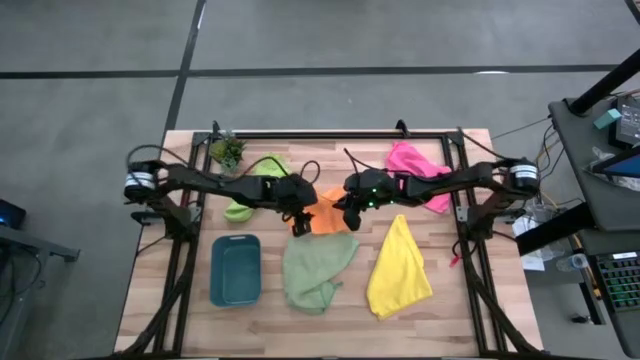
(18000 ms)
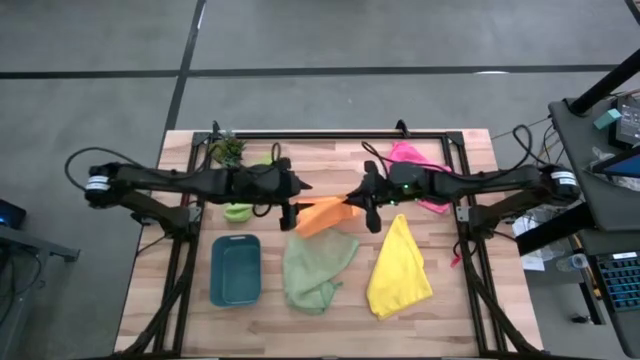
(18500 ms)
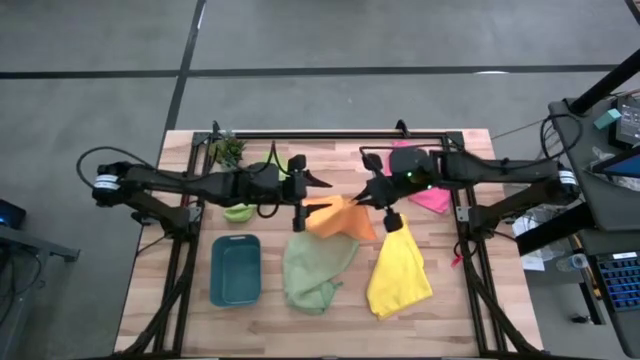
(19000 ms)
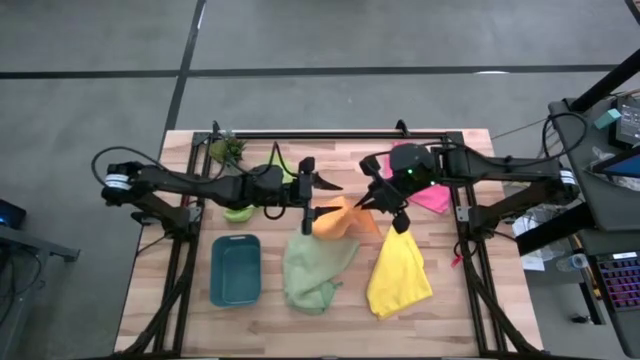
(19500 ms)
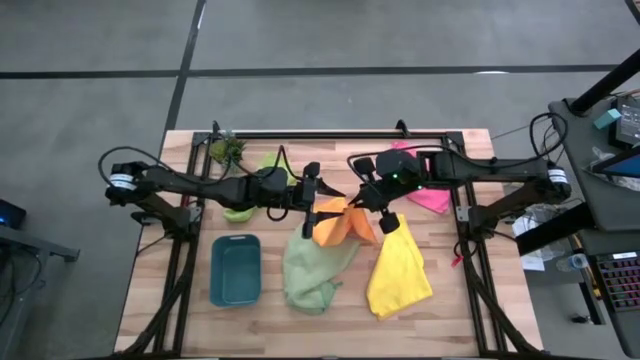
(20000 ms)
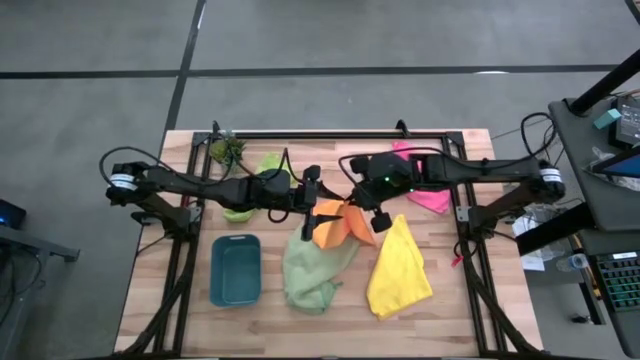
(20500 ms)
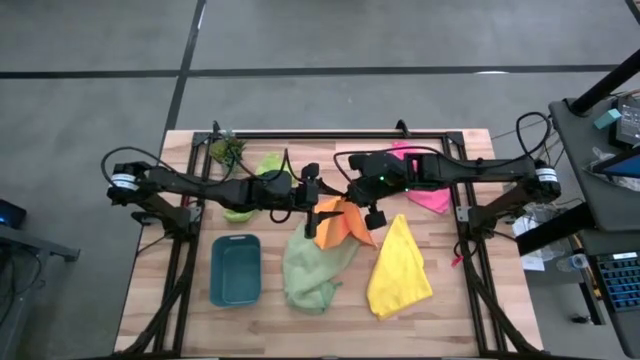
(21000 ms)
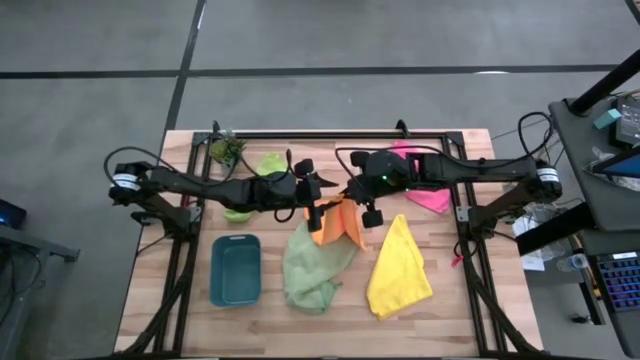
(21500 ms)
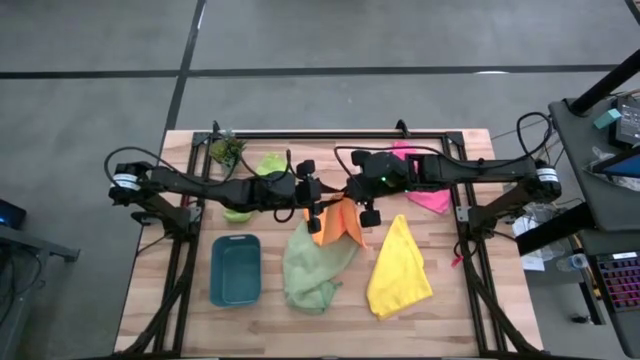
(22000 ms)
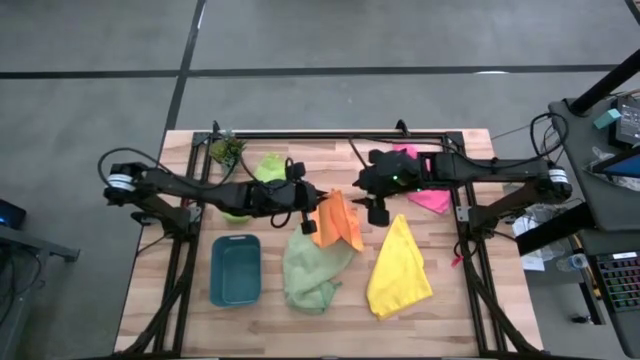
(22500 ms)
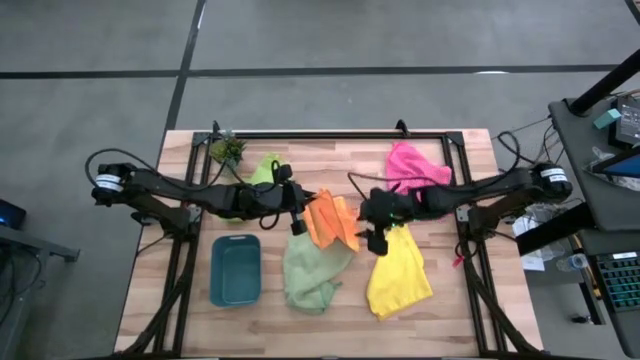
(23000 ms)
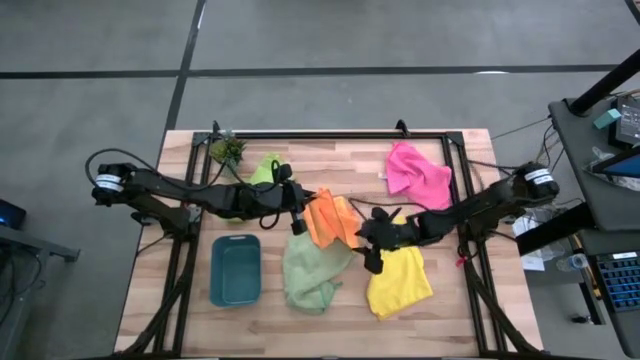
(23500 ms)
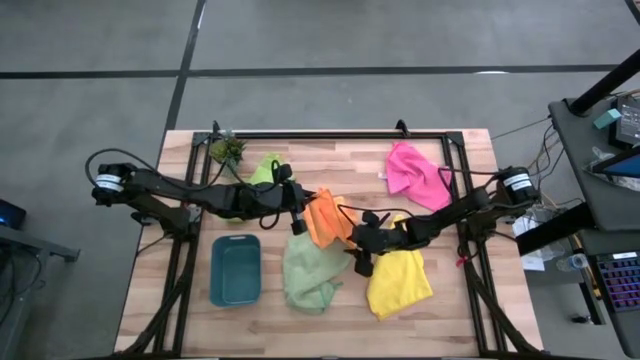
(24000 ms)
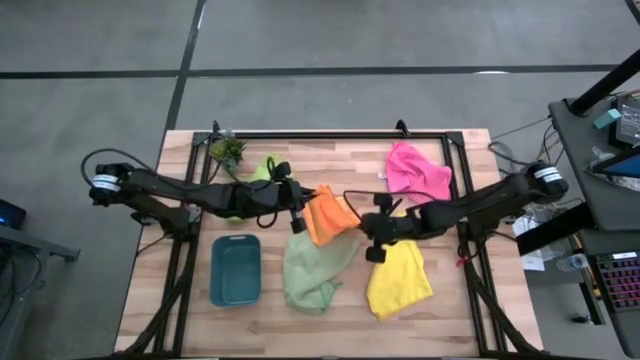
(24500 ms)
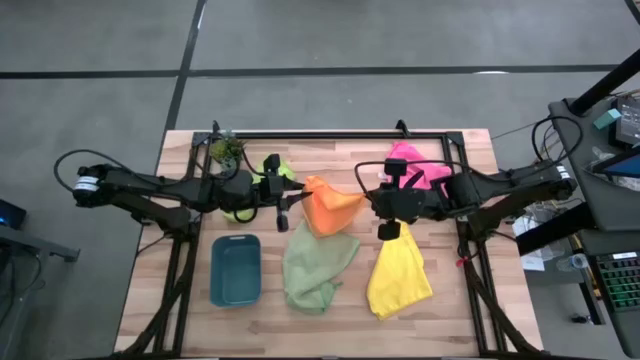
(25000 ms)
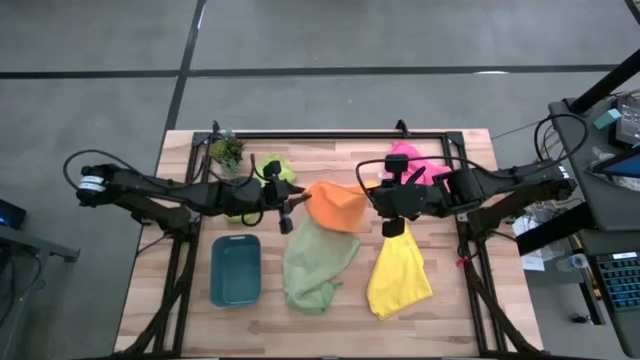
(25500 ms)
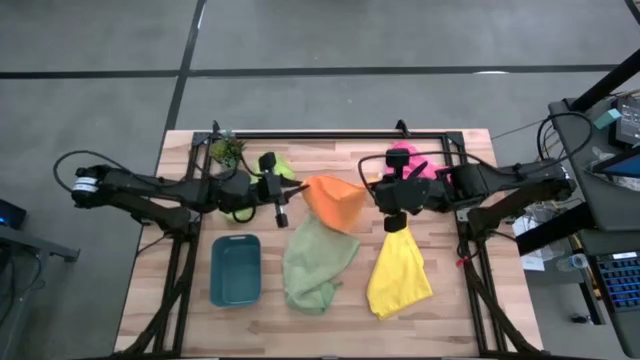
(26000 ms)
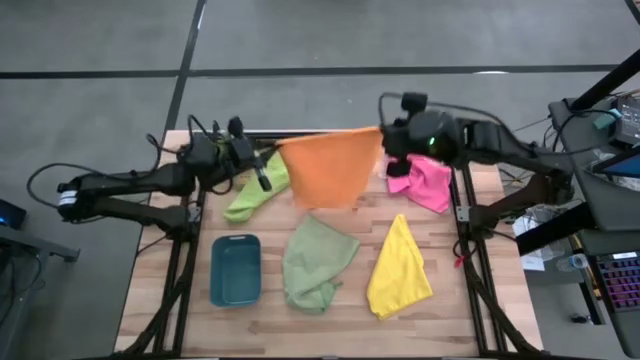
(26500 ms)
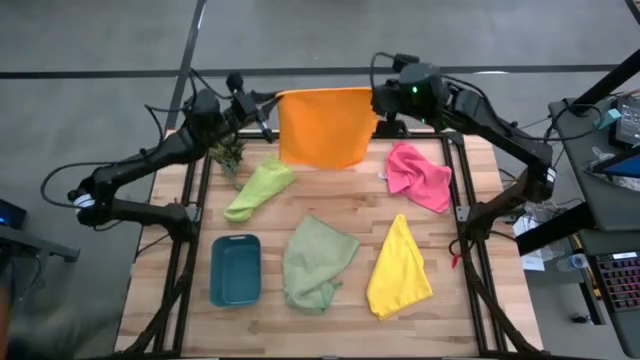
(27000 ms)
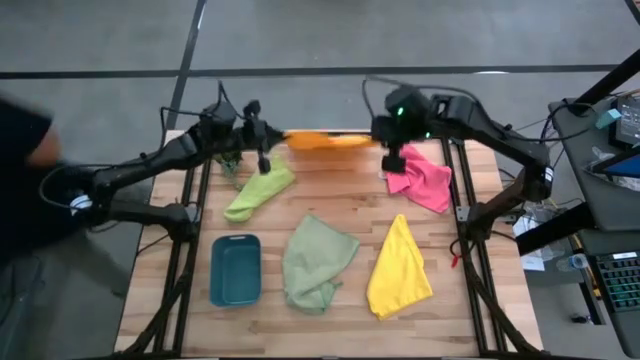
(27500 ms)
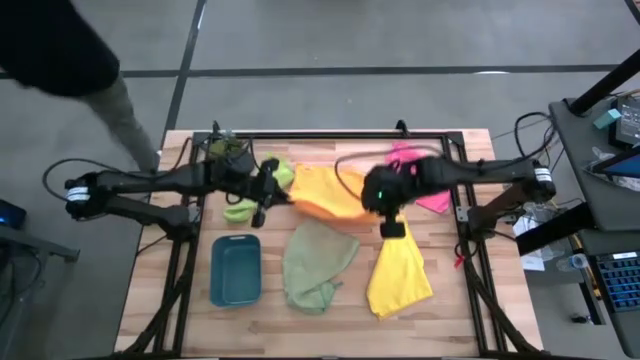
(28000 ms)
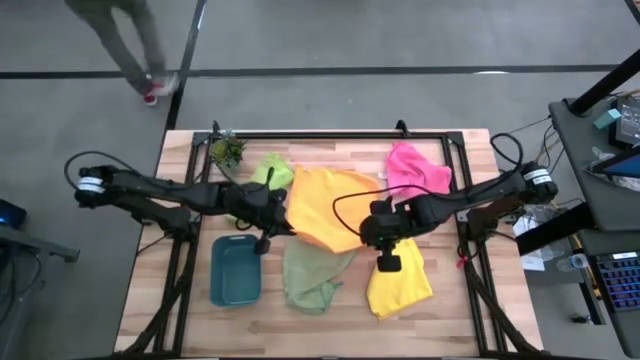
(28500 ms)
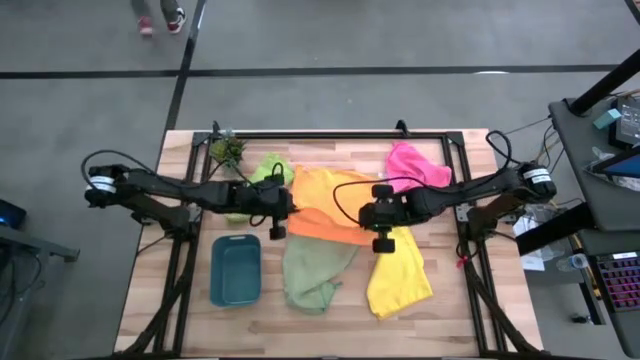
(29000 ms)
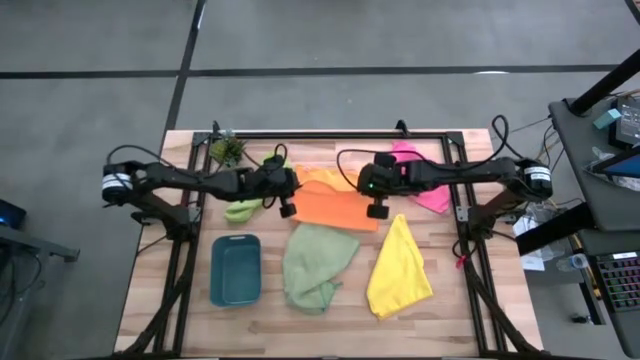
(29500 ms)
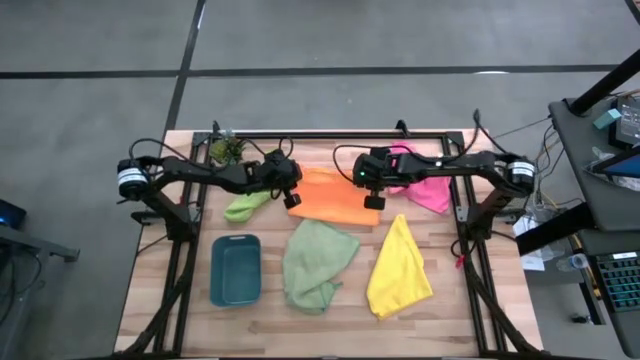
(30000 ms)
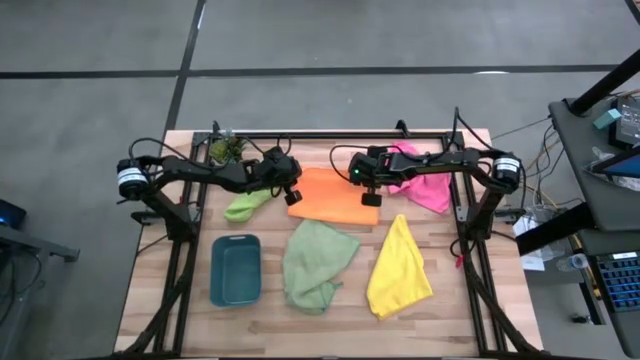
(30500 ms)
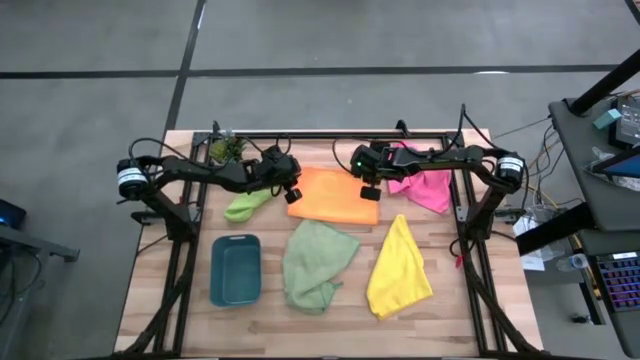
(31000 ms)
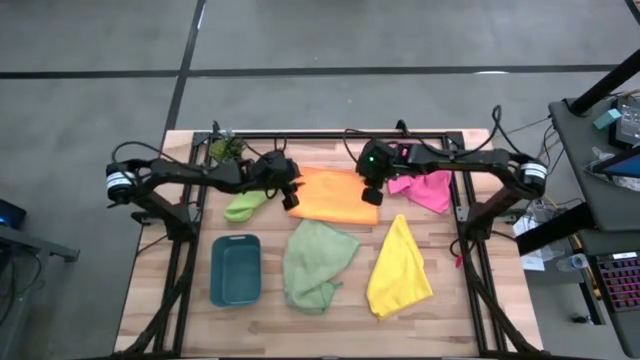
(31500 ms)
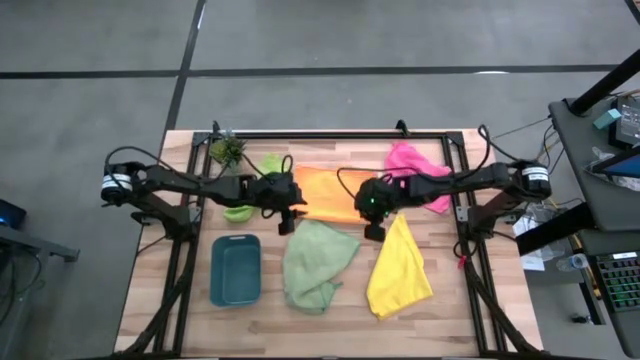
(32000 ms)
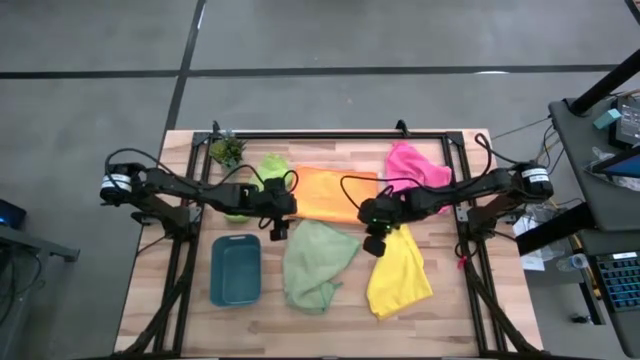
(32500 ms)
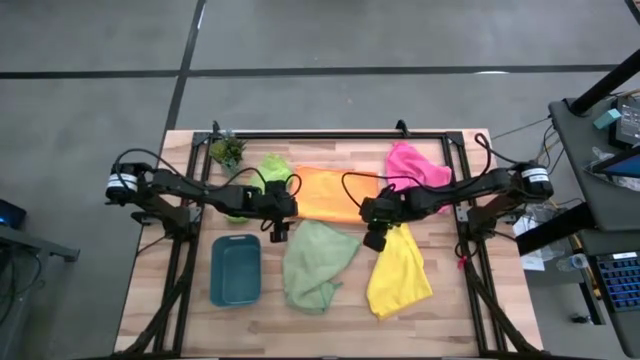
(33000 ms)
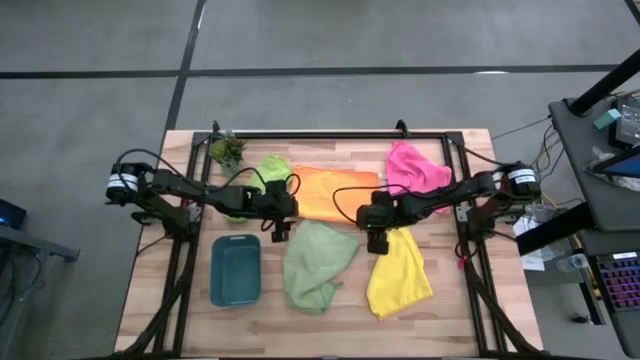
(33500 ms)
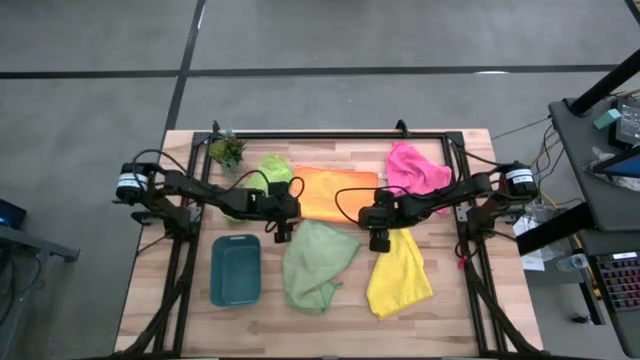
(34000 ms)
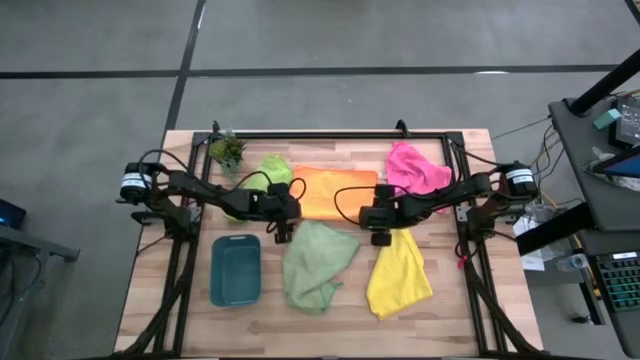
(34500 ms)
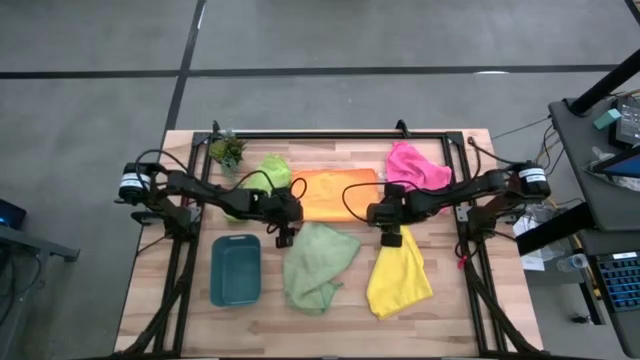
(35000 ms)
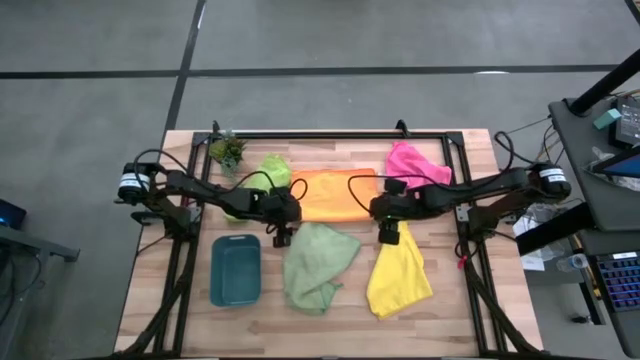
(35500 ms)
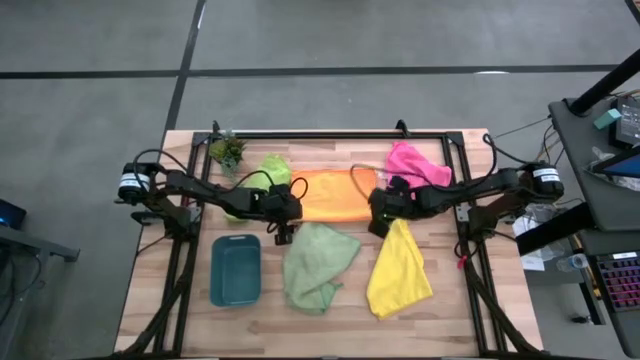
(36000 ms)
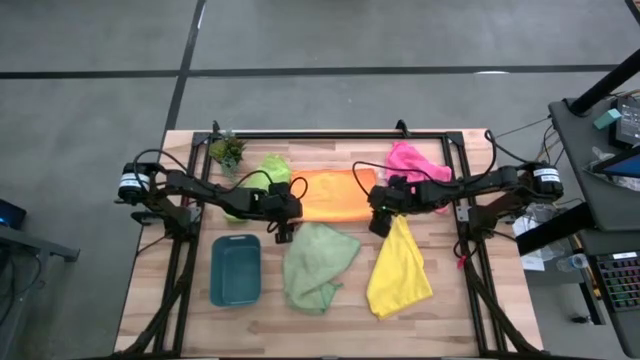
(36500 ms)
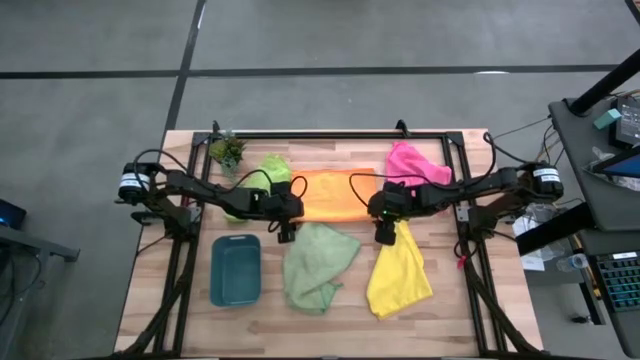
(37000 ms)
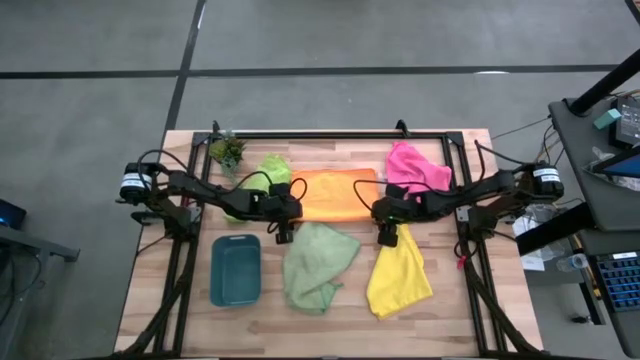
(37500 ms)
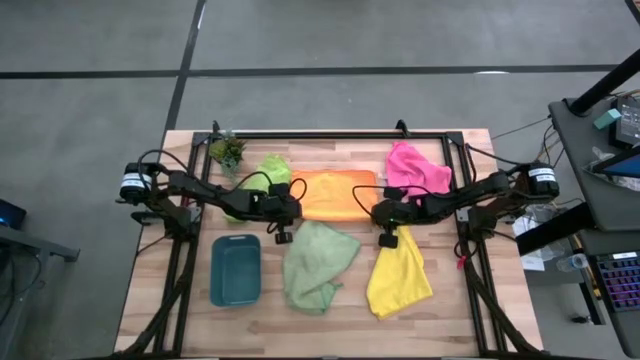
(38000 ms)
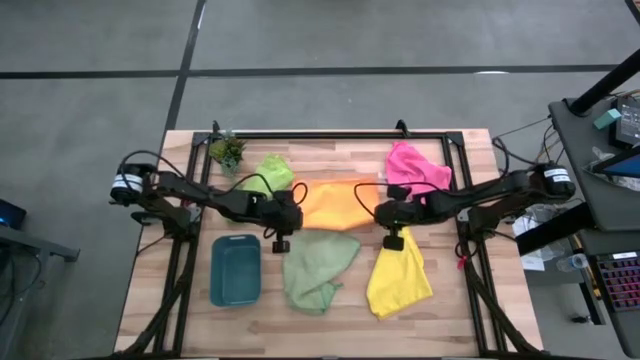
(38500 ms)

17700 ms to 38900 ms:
Task: Fold microfiber towels
Fold the orange microfiber cloth

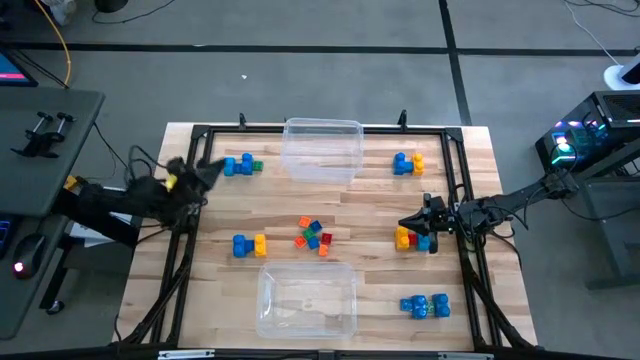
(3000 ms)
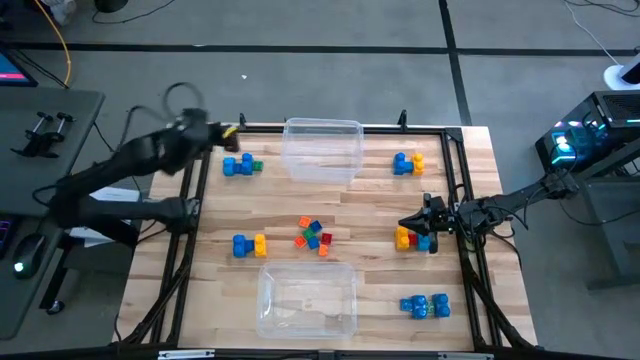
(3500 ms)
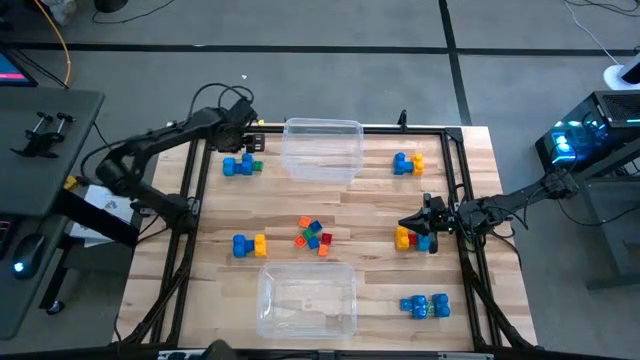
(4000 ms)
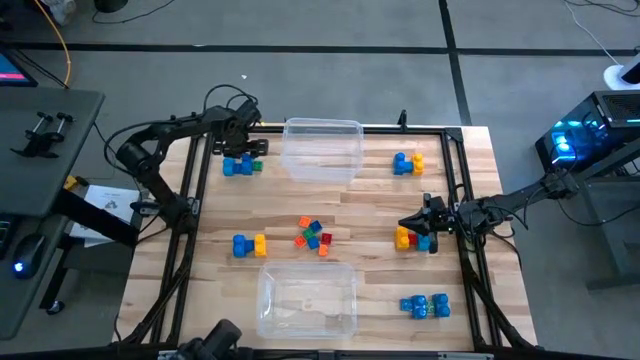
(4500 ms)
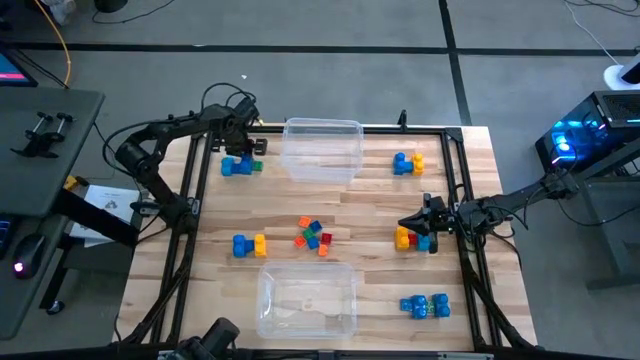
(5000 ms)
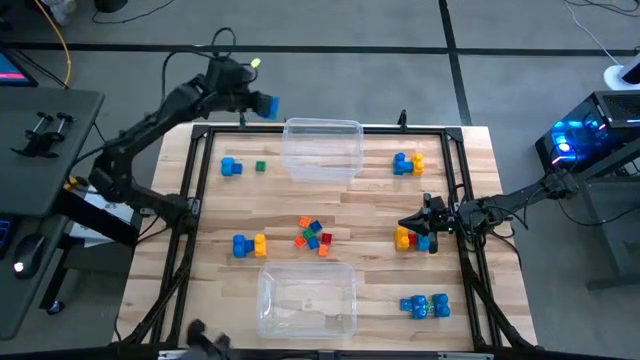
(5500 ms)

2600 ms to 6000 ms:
Task: Sort blocks by size
Put the large blue game piece into the top transparent bin
